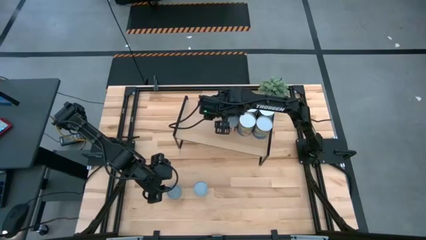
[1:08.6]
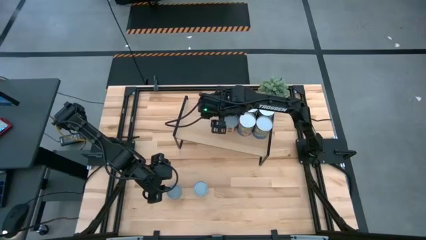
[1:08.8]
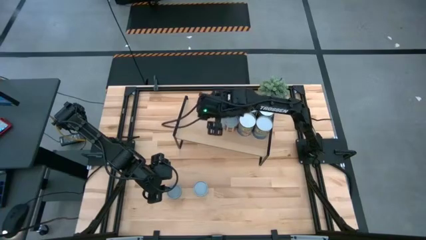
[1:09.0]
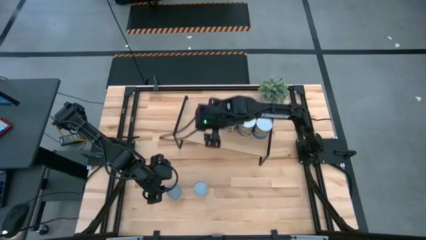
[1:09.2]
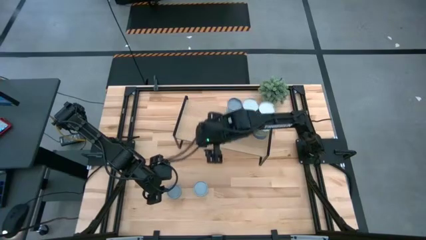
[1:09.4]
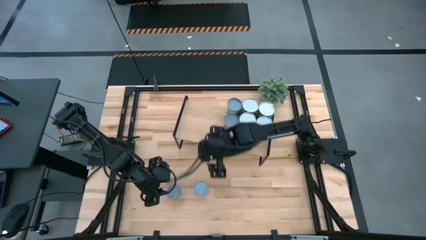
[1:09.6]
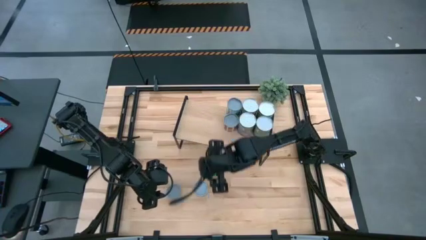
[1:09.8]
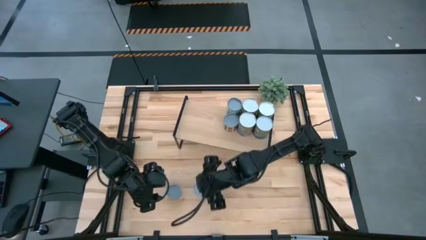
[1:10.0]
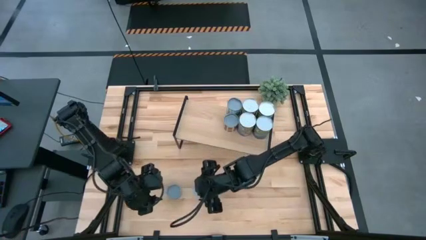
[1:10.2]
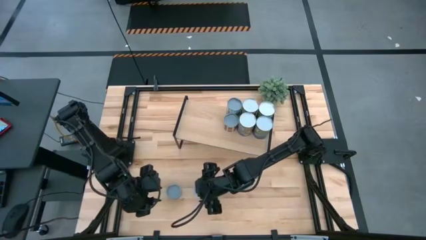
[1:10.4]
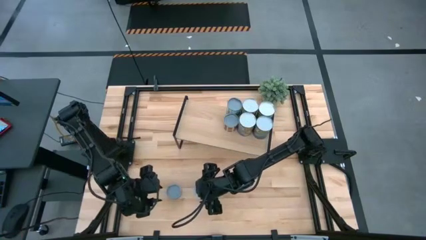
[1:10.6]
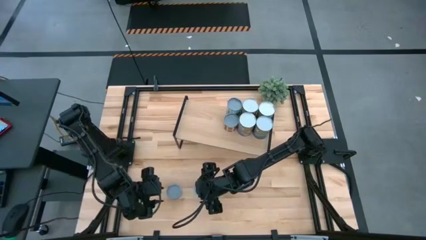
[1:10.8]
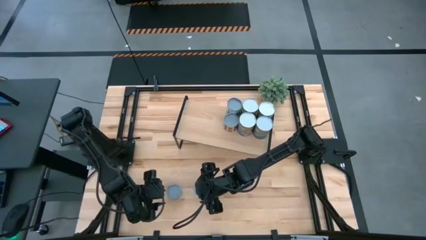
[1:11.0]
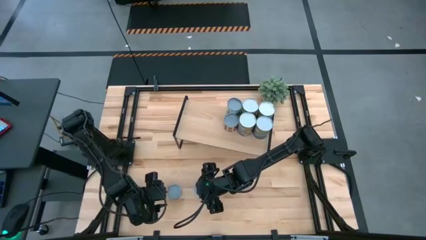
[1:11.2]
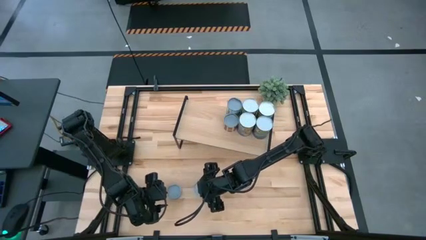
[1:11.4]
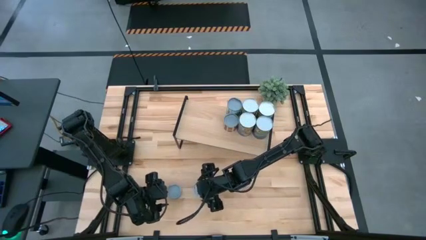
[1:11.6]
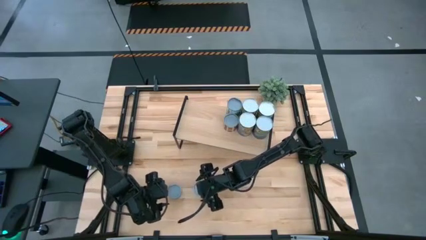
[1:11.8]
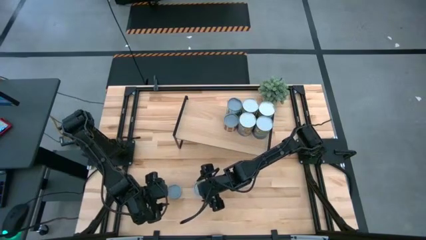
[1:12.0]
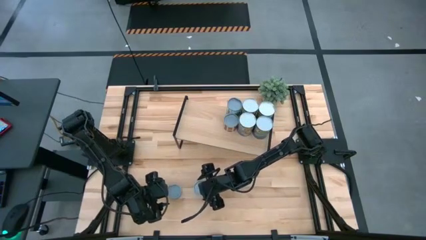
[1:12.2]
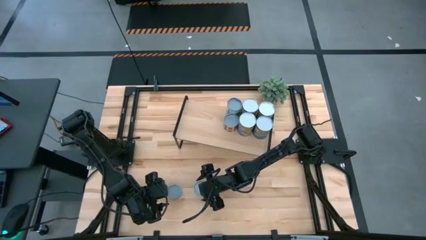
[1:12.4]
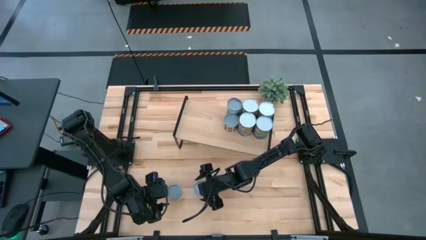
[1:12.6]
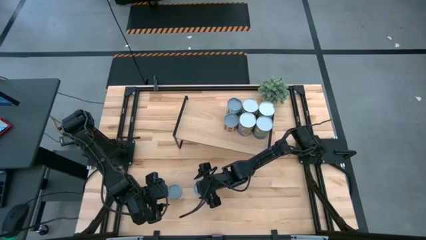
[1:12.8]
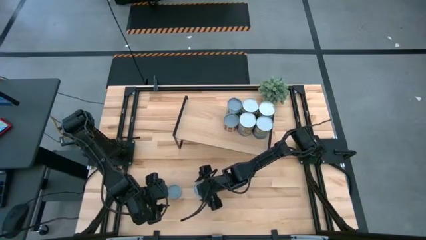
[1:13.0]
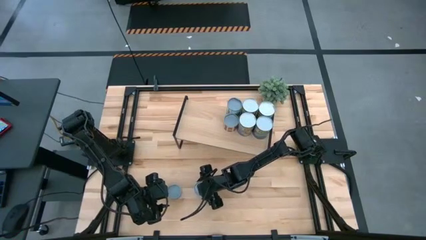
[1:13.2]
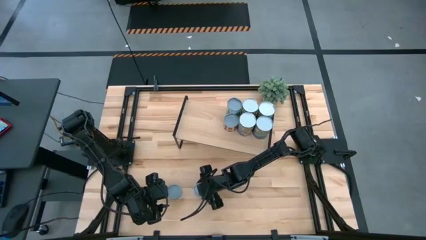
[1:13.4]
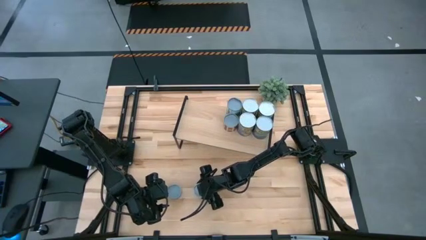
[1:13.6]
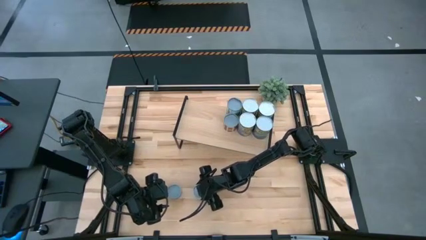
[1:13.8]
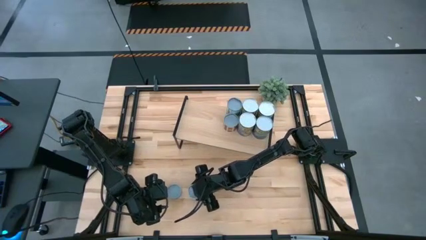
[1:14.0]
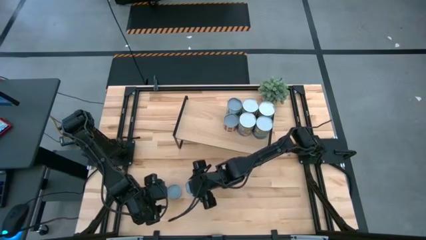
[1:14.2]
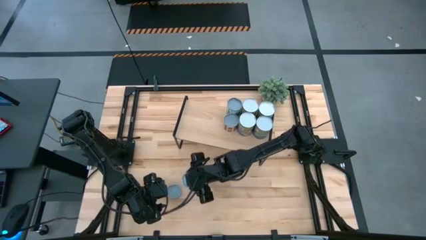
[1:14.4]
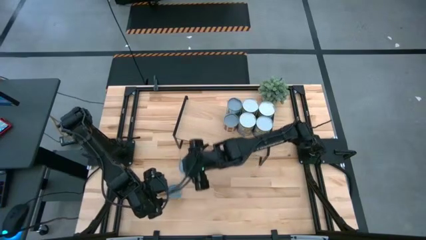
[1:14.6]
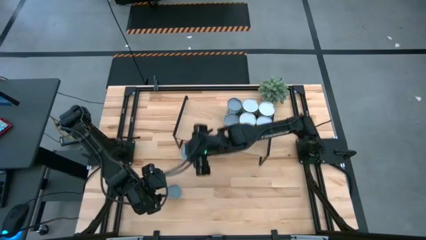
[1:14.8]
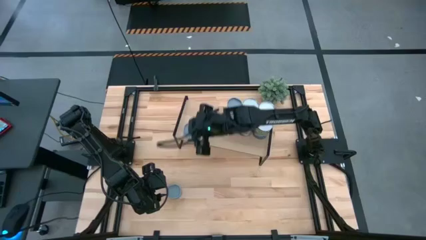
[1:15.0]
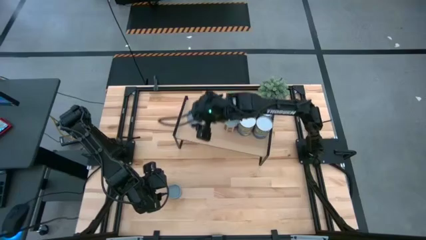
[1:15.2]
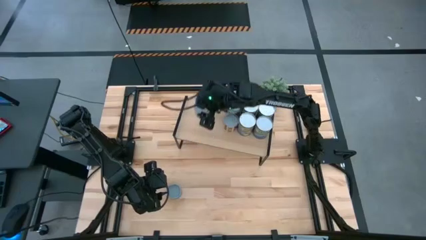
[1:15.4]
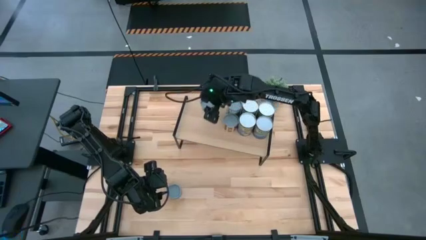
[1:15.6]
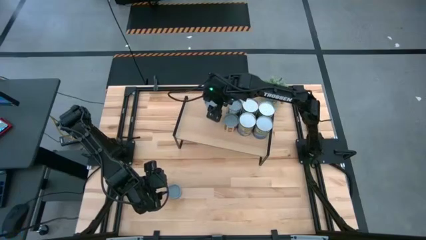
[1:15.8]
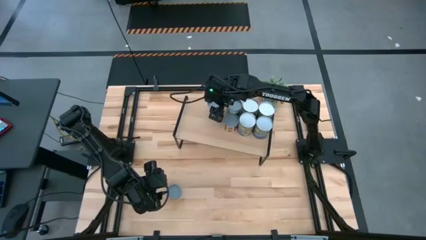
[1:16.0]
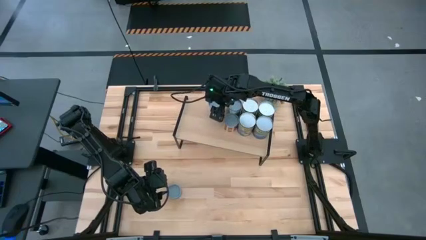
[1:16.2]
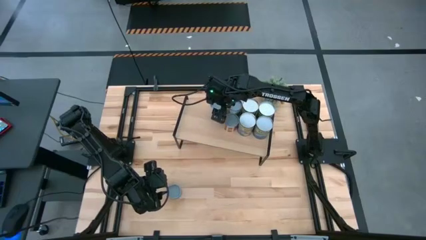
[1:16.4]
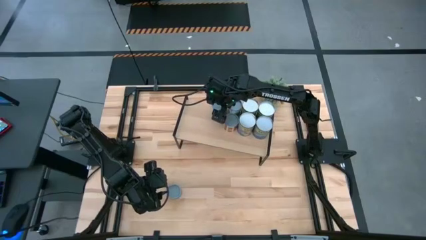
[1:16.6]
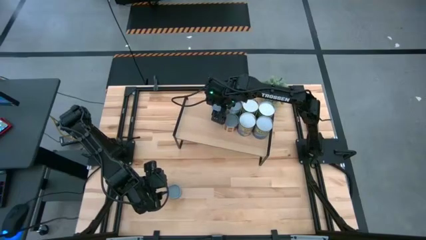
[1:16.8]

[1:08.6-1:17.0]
Task: Pick and place cans onto a shelf
Put the canned green peas on the shelf

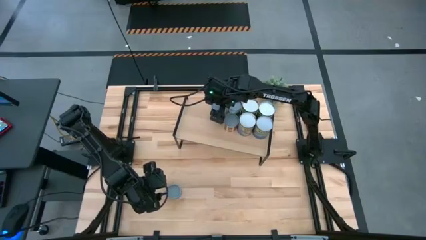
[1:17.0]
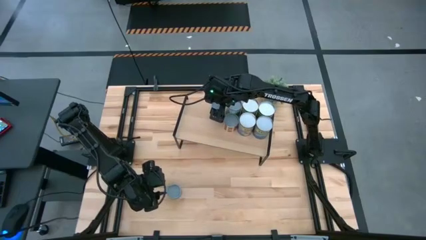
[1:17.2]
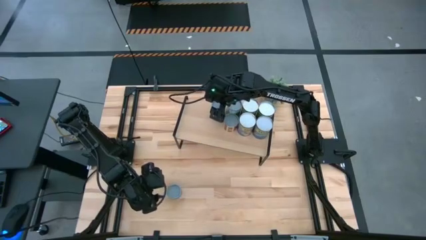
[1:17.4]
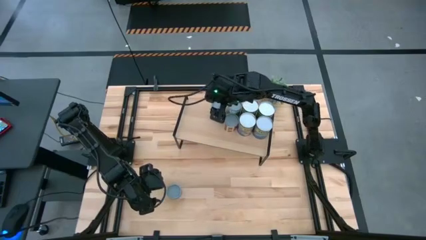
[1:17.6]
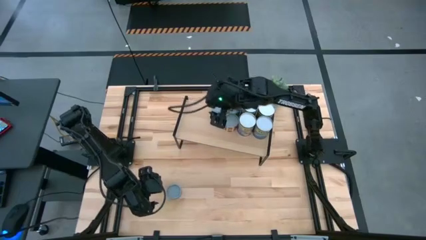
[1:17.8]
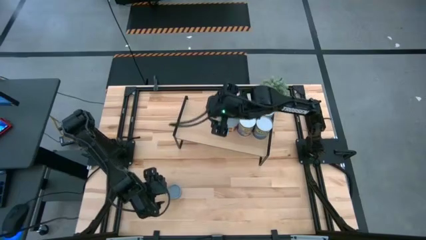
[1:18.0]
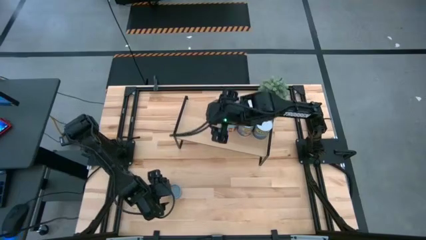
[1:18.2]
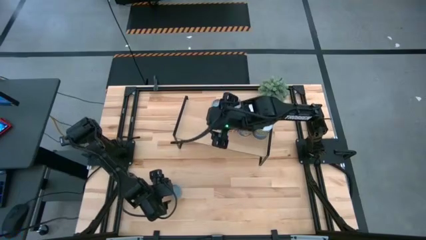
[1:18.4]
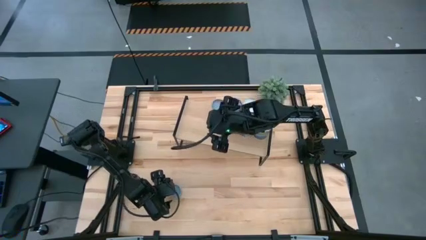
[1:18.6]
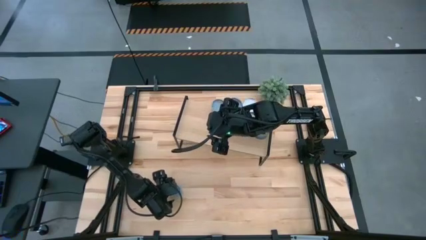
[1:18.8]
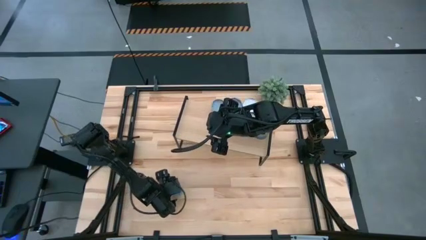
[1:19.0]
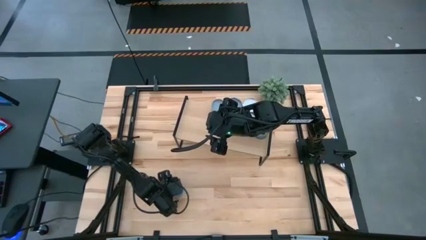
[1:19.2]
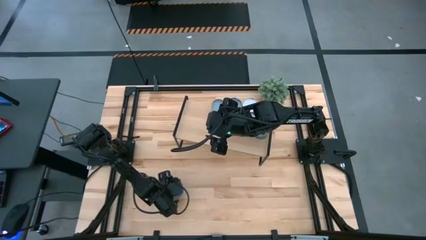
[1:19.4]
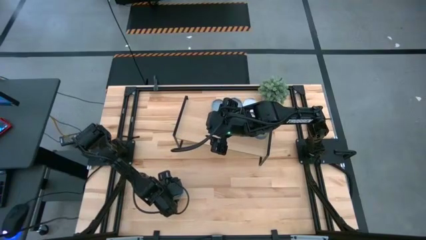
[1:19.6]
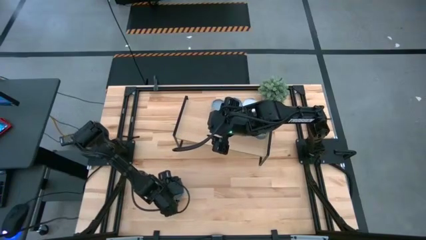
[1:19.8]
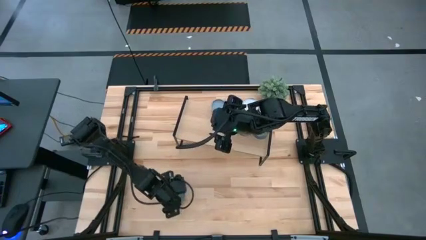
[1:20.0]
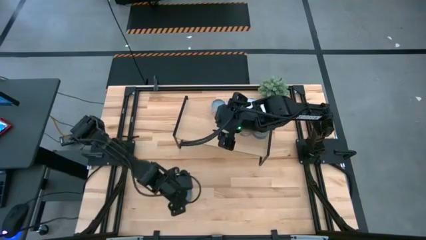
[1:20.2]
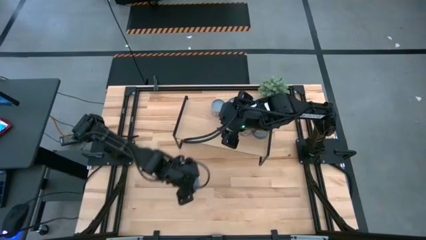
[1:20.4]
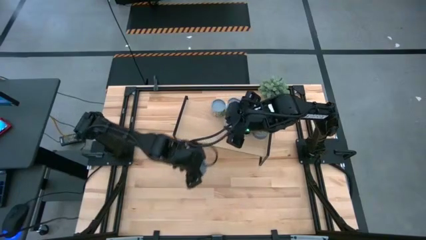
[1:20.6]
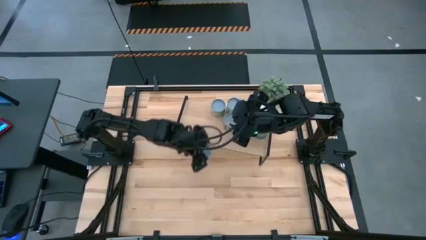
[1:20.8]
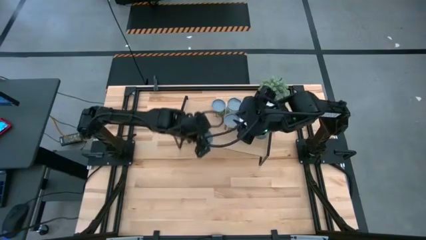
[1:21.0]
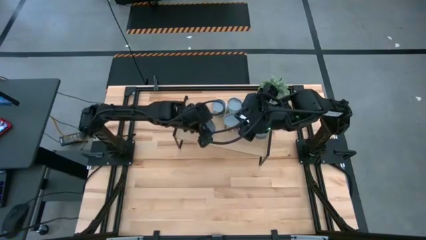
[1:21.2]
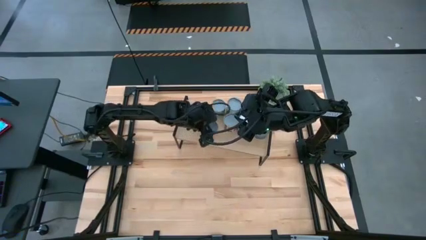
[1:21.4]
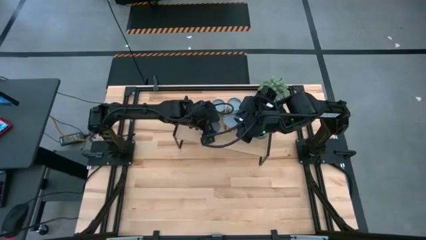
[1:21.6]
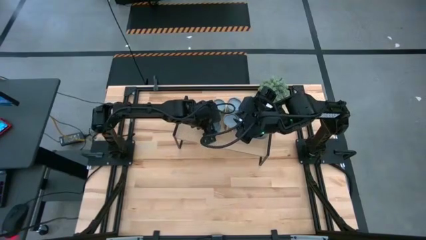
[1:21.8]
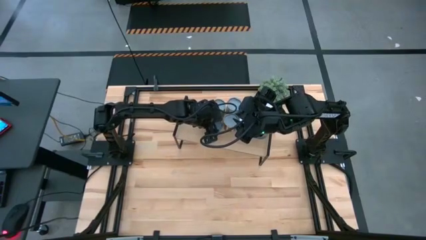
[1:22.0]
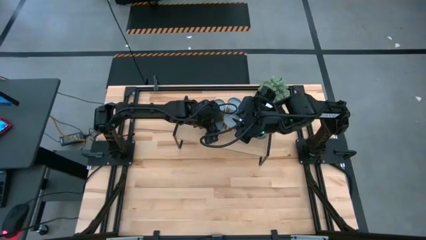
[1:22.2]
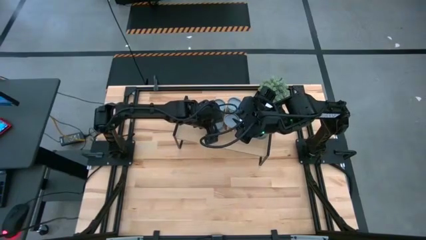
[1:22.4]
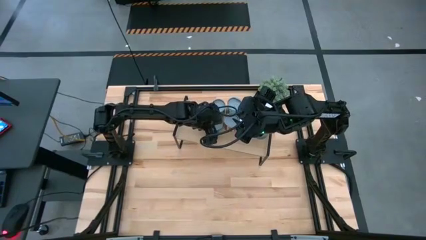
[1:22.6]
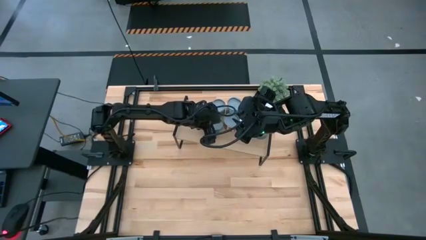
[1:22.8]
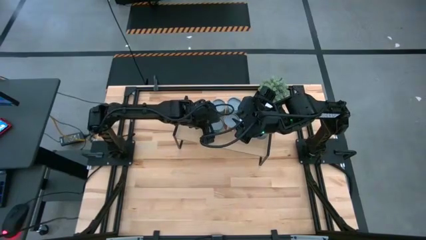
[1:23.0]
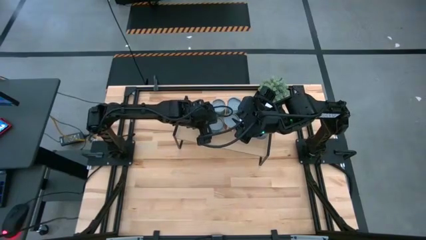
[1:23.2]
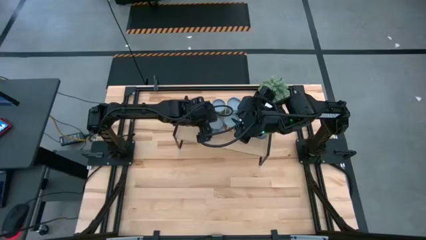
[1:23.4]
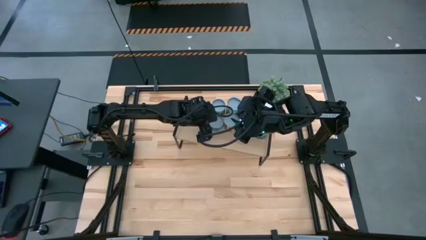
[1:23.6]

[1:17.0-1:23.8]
Put the canned tuna on the shelf

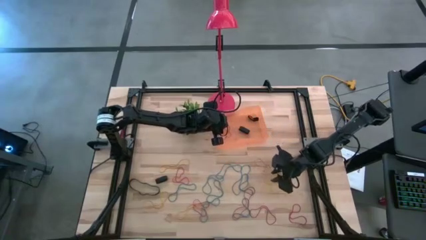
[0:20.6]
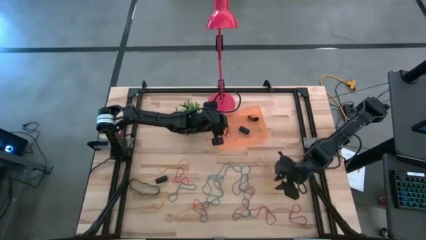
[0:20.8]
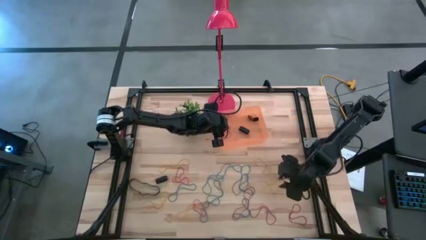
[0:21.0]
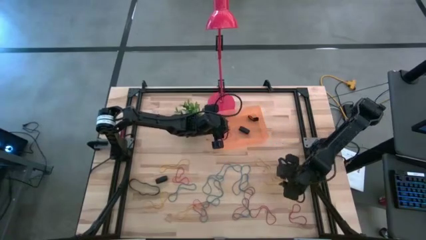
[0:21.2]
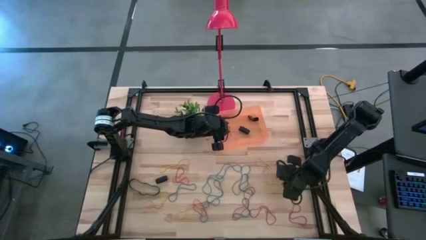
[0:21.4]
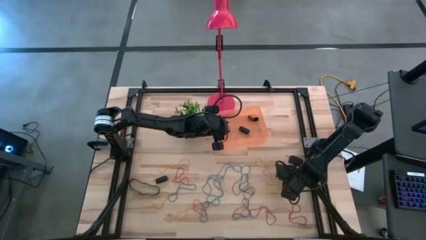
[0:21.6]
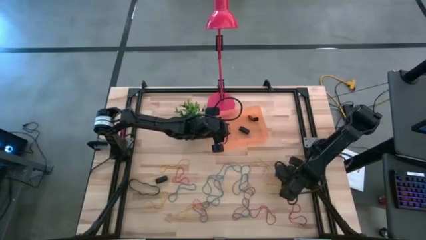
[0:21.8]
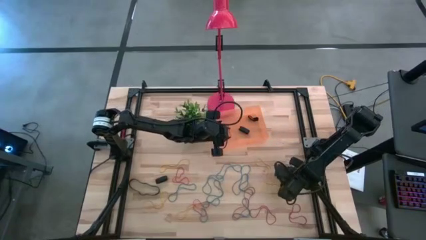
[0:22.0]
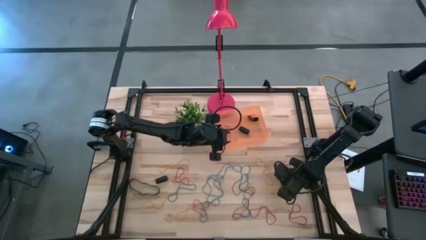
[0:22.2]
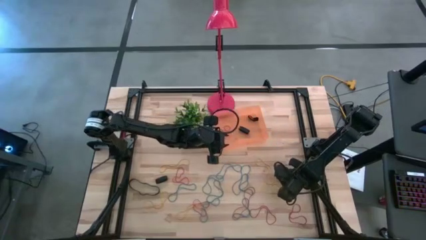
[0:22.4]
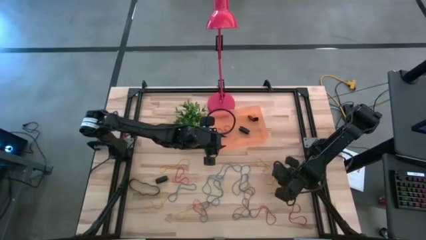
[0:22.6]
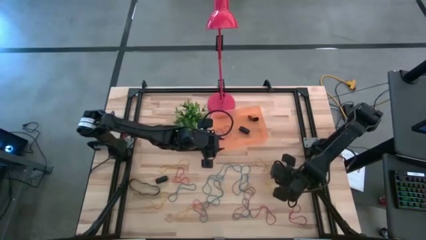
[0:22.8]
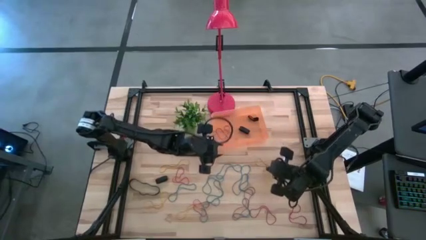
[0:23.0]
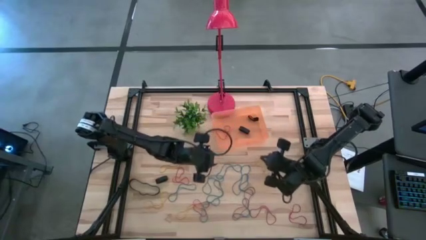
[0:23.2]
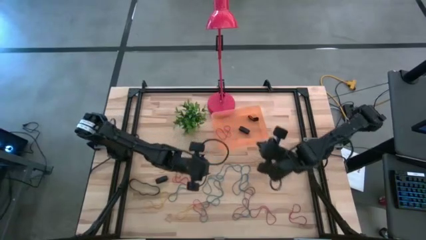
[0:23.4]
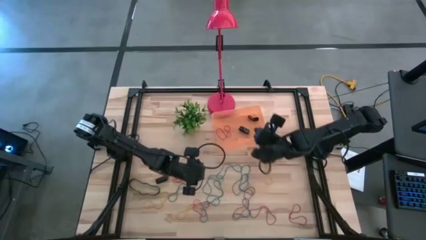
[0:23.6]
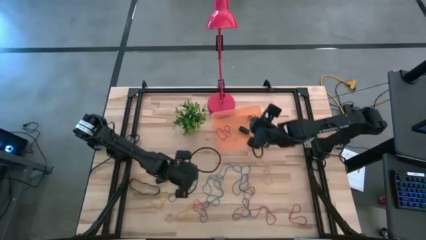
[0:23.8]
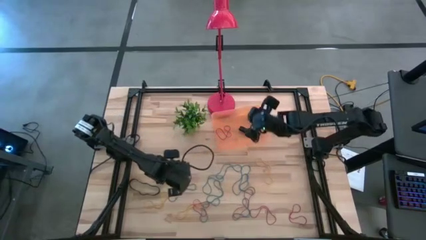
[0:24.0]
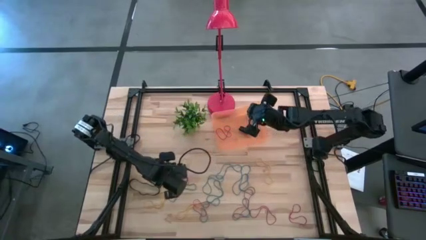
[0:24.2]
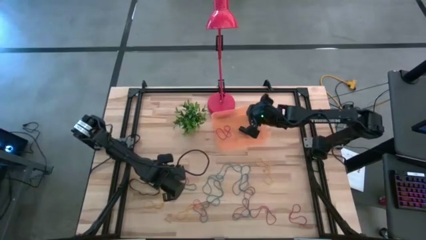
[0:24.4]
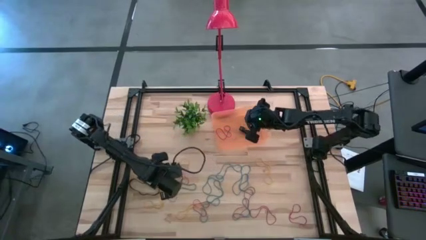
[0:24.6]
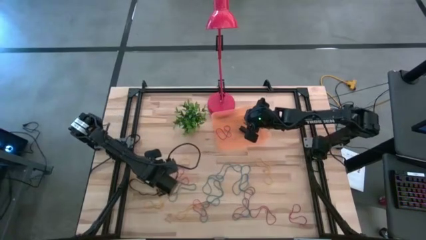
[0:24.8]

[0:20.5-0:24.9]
Task: Pick and place rubber bands into bin
Put the right yellow rubberband into the orange container
